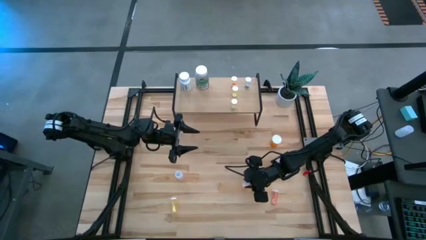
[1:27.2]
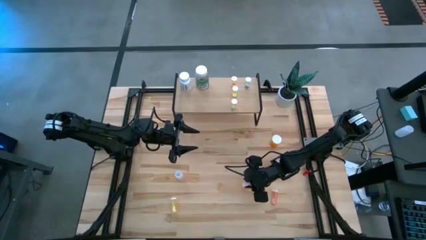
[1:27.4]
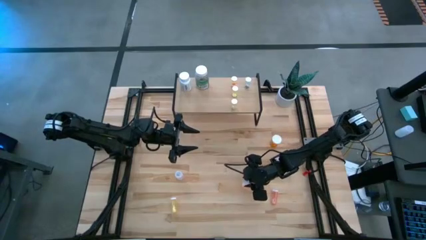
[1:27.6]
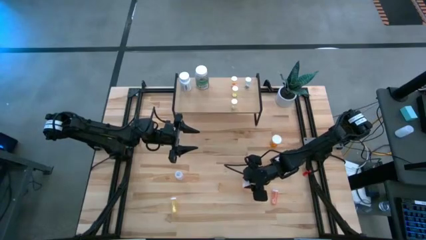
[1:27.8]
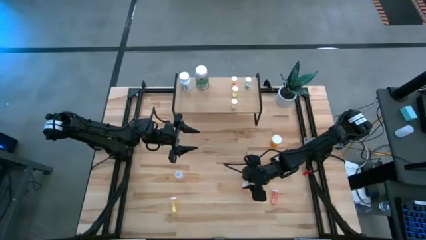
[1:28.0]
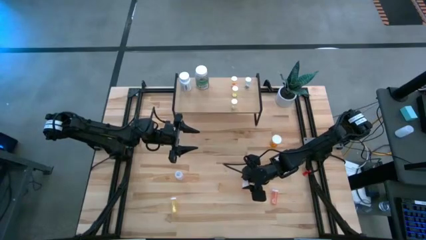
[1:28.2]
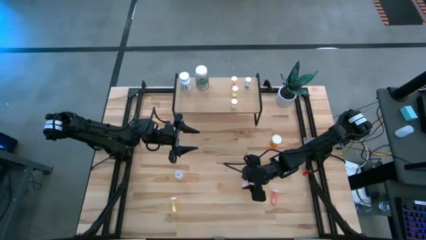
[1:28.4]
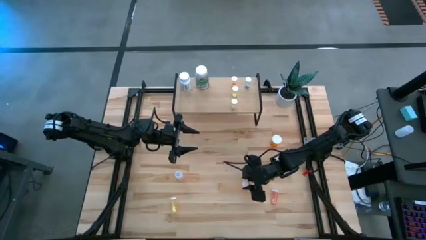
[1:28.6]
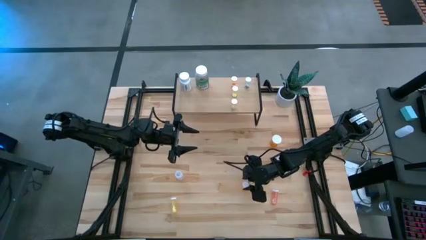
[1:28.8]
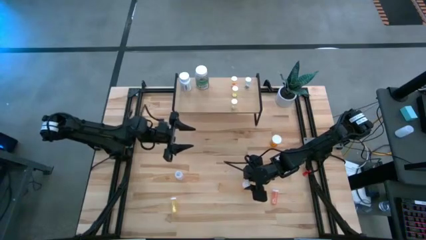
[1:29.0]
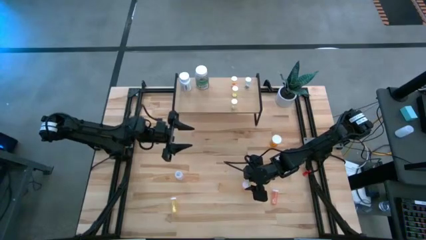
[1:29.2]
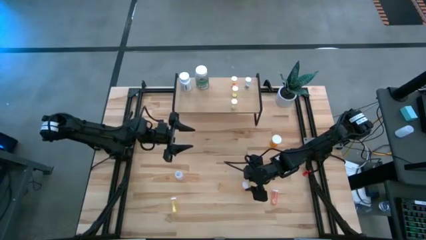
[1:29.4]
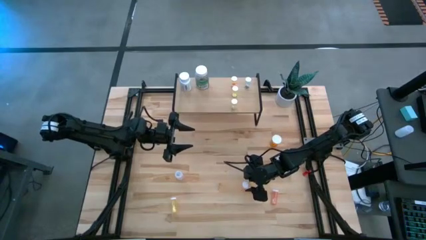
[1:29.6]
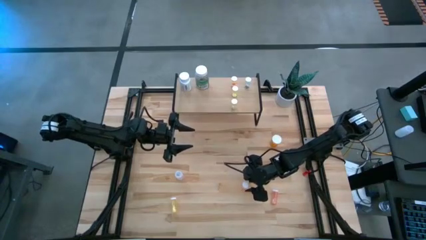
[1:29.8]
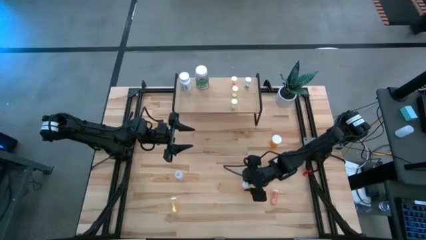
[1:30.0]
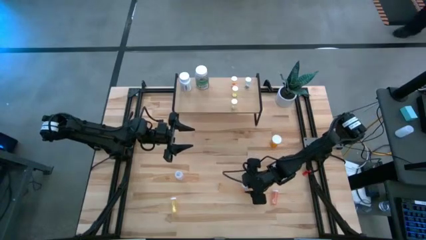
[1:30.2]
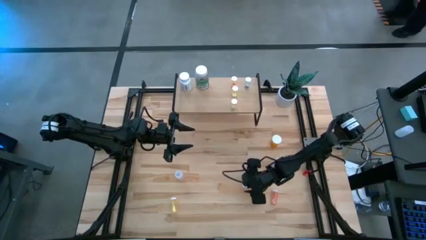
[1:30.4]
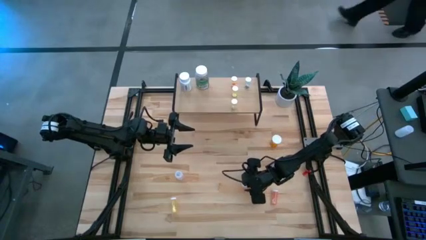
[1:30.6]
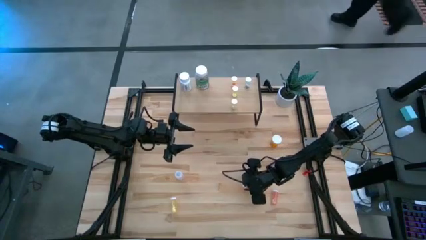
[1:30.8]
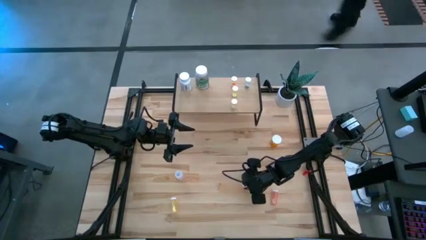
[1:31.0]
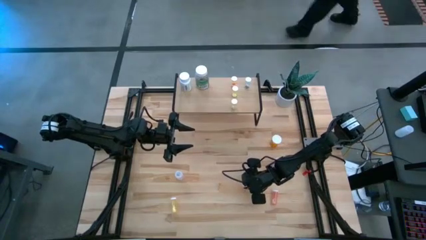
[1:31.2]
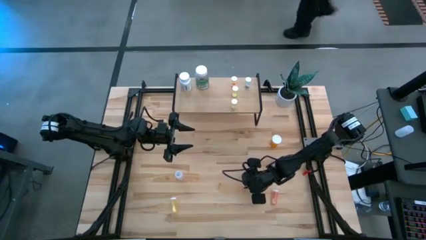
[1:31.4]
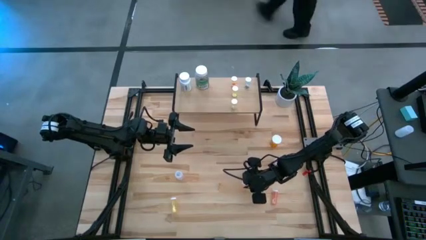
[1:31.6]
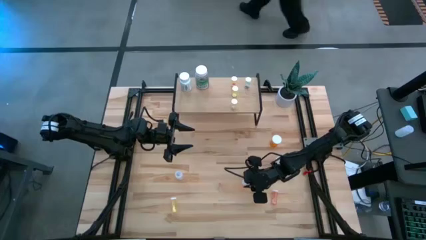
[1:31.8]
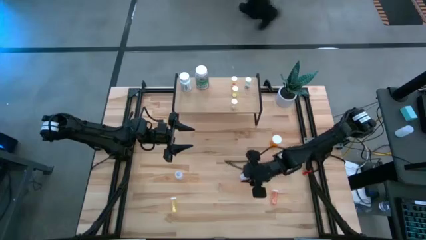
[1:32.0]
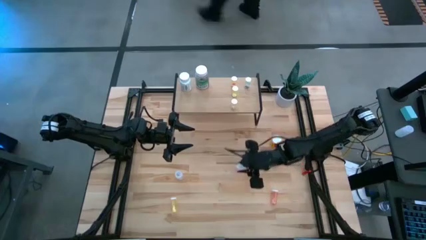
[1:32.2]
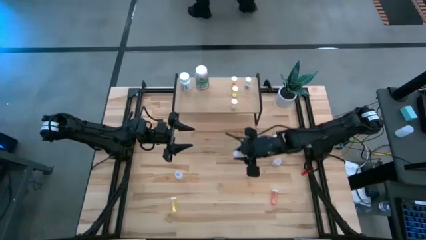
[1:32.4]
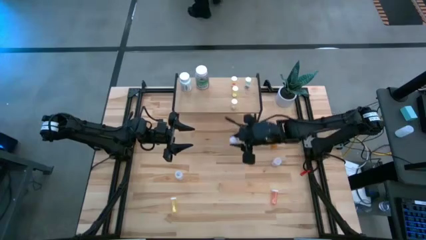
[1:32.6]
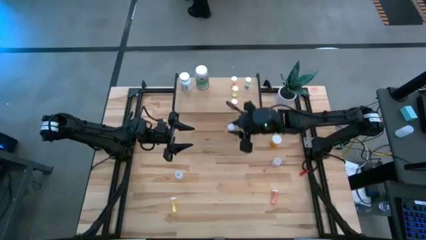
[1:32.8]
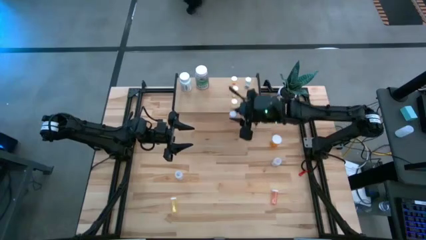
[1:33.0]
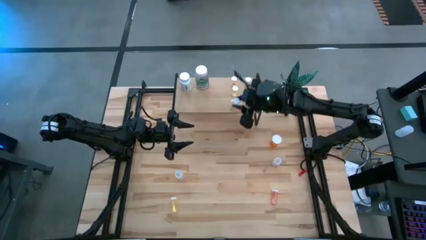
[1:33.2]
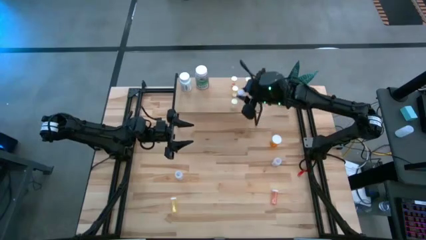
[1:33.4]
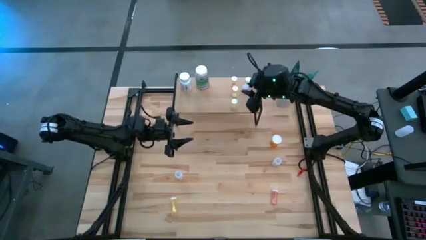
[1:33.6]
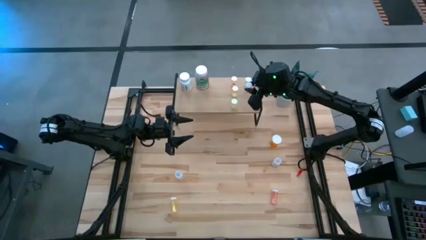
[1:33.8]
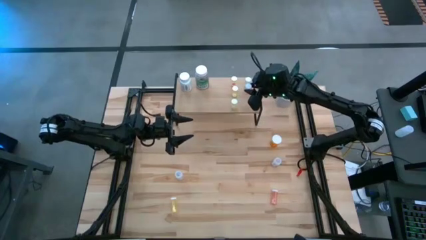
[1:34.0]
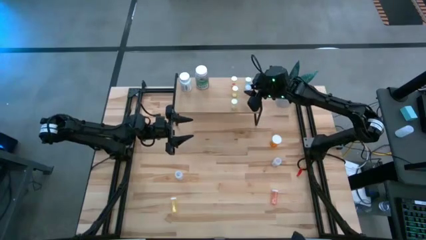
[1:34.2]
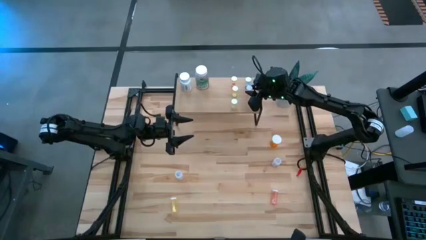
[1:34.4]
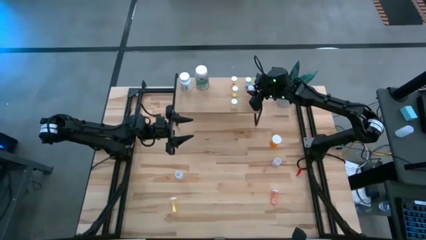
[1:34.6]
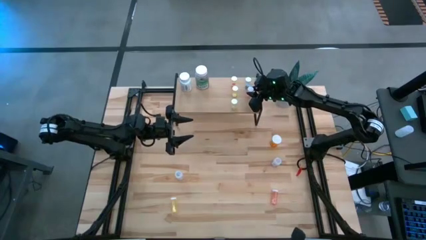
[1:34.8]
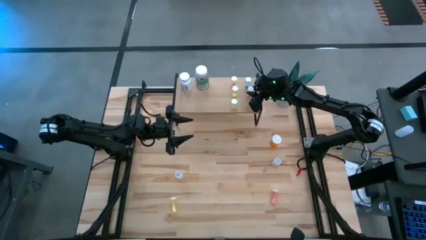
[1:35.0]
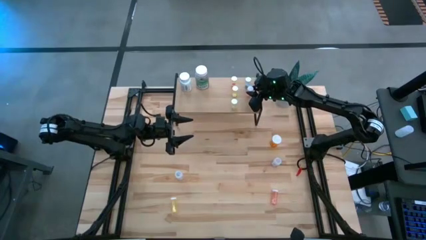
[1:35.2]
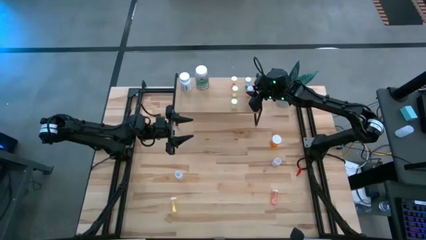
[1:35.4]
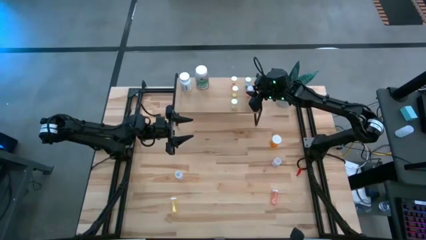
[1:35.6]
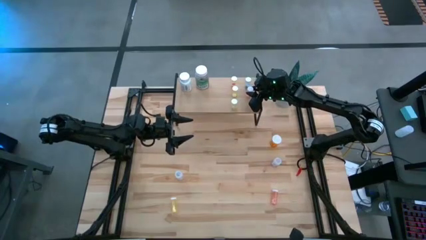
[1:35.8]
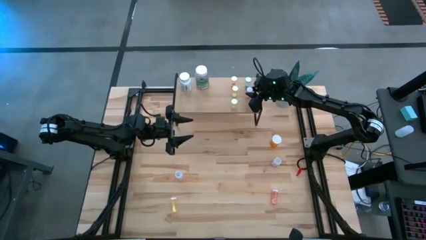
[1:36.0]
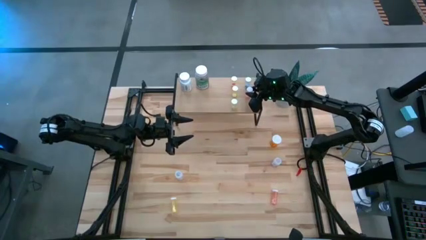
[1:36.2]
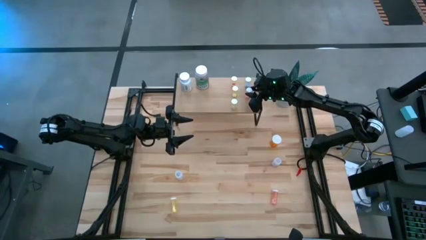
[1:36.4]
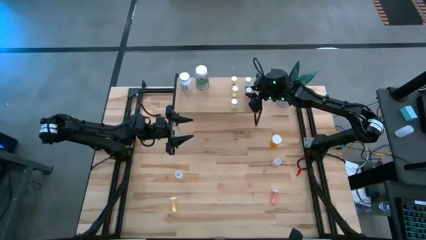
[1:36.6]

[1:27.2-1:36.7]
Task: Pick and place medicine bottles onto shelf by color
Put the right pink pill bottle on the shelf

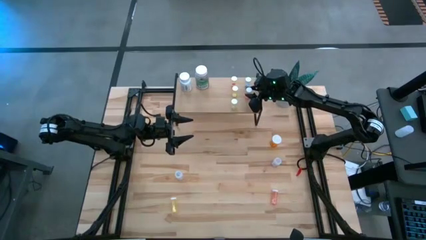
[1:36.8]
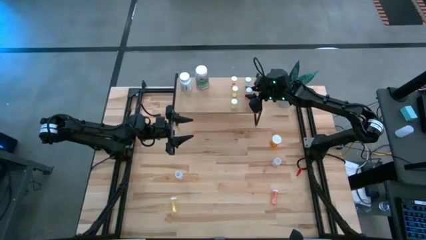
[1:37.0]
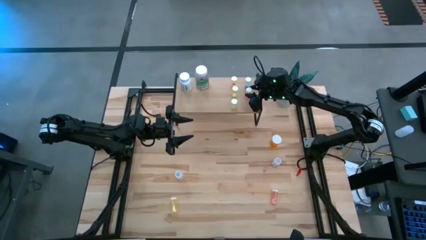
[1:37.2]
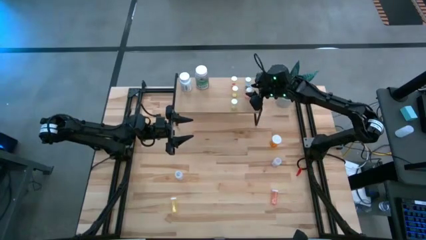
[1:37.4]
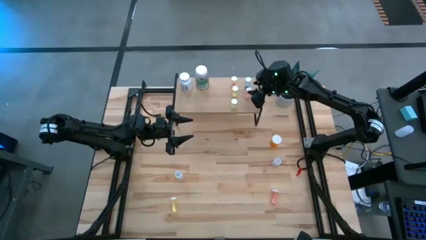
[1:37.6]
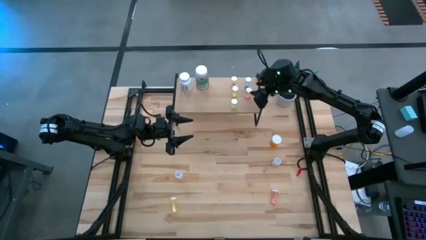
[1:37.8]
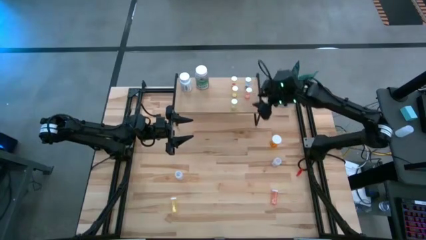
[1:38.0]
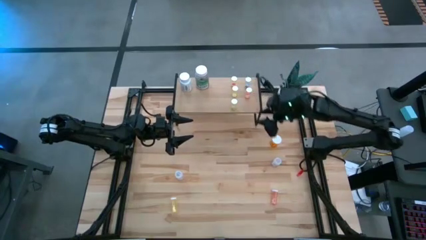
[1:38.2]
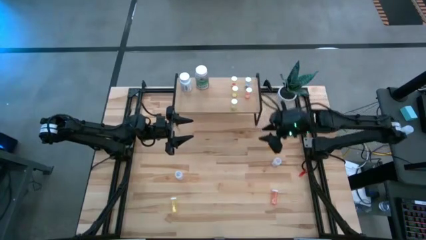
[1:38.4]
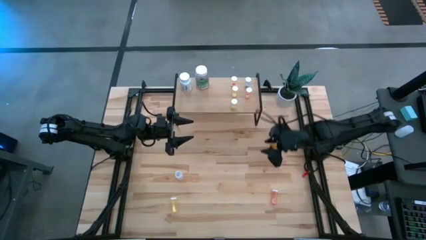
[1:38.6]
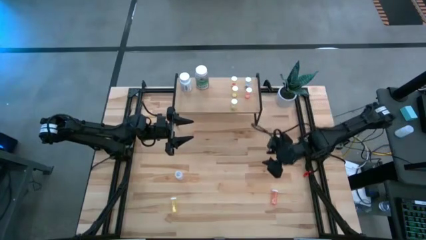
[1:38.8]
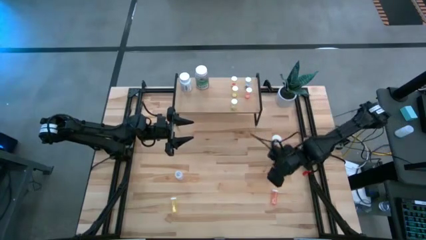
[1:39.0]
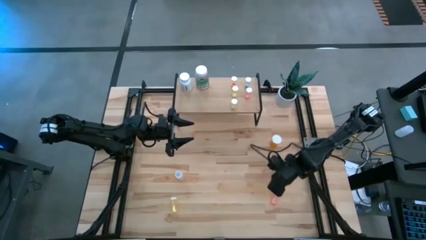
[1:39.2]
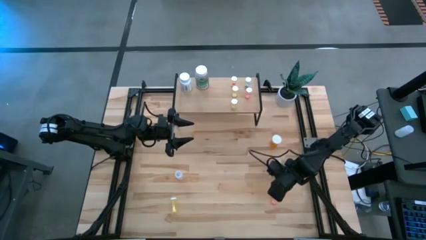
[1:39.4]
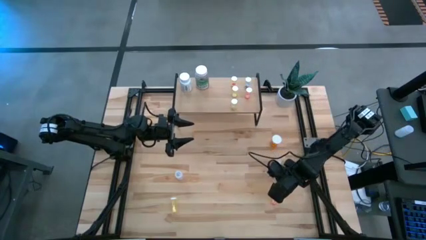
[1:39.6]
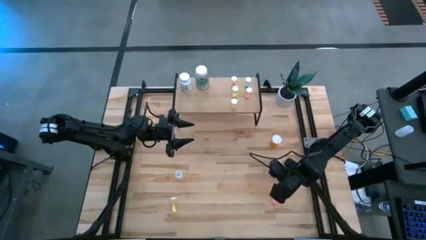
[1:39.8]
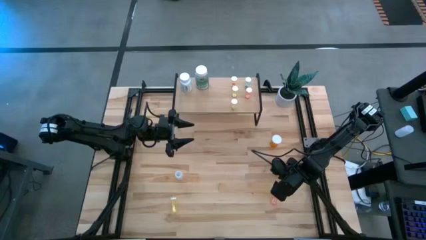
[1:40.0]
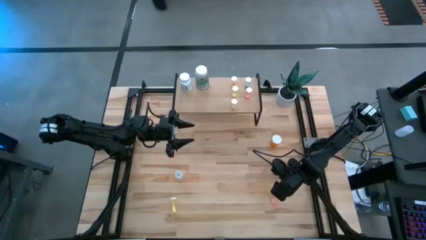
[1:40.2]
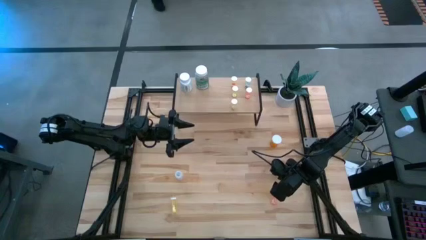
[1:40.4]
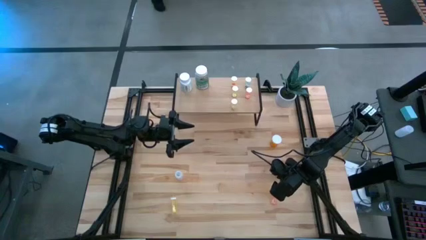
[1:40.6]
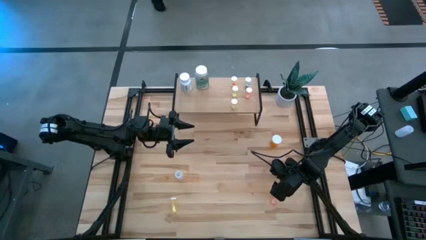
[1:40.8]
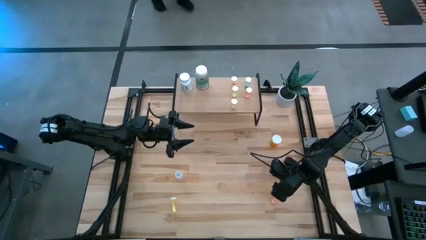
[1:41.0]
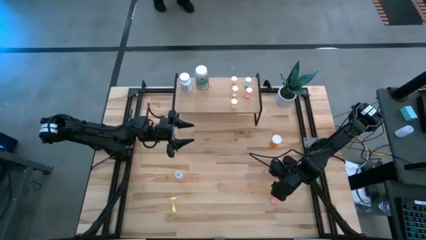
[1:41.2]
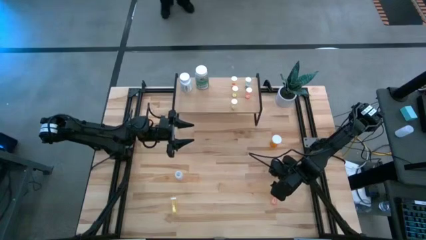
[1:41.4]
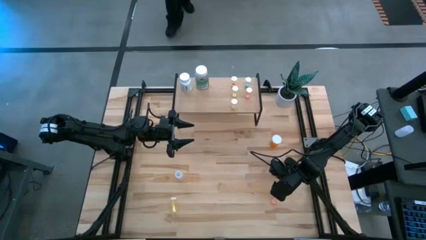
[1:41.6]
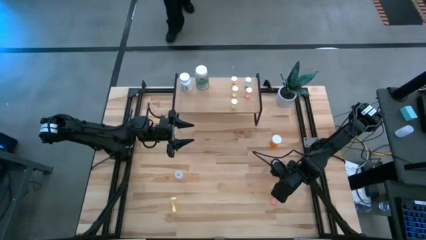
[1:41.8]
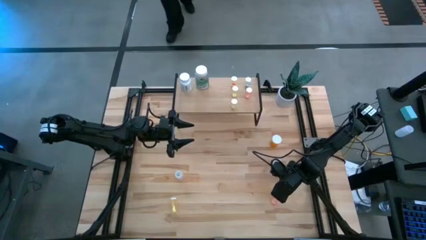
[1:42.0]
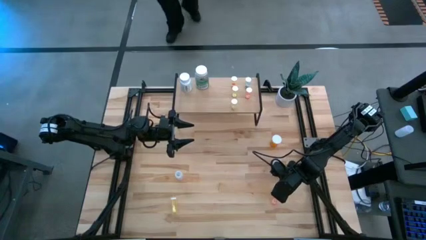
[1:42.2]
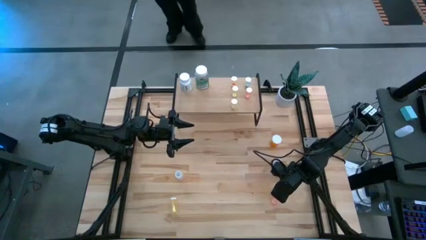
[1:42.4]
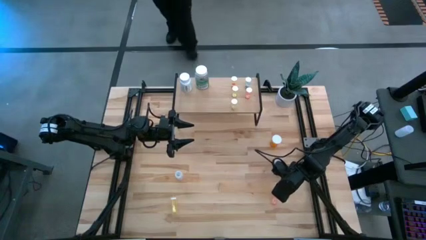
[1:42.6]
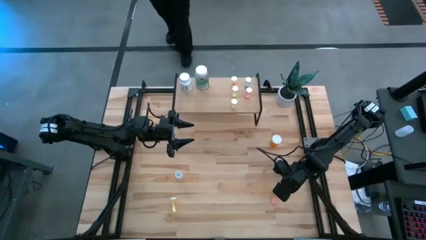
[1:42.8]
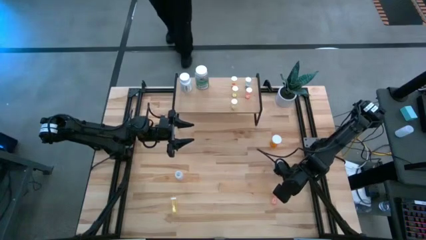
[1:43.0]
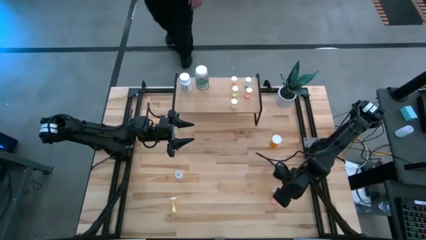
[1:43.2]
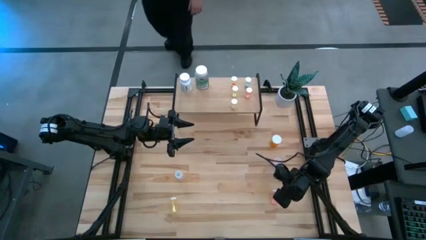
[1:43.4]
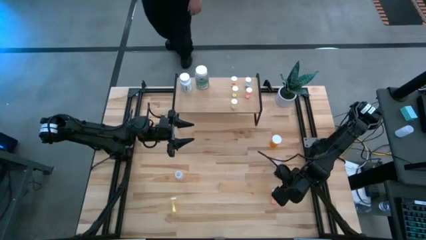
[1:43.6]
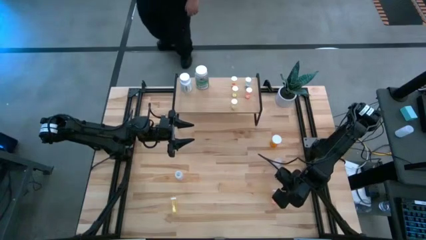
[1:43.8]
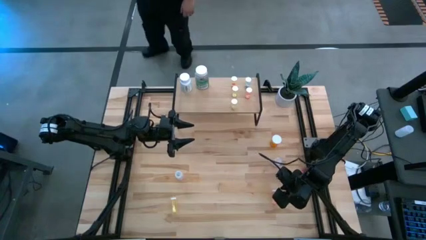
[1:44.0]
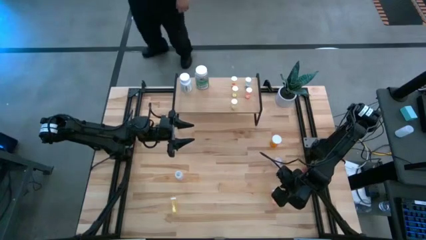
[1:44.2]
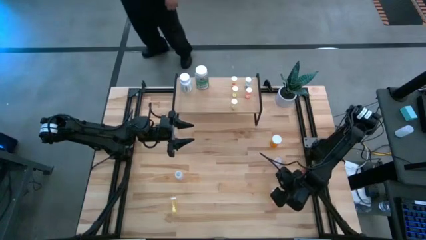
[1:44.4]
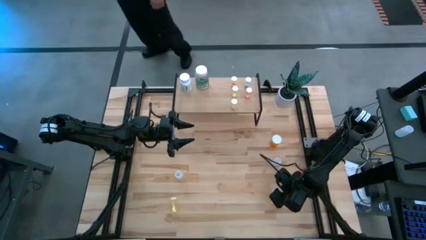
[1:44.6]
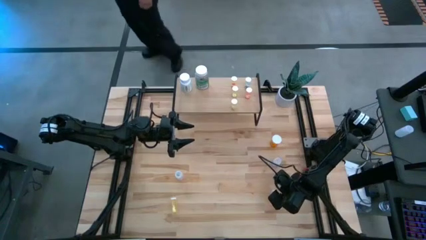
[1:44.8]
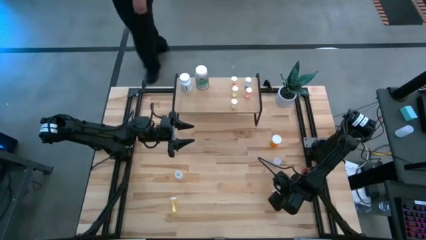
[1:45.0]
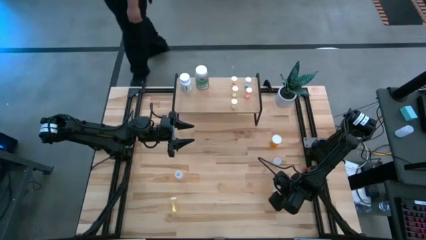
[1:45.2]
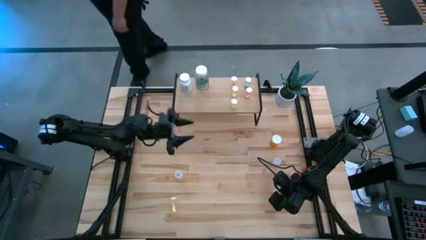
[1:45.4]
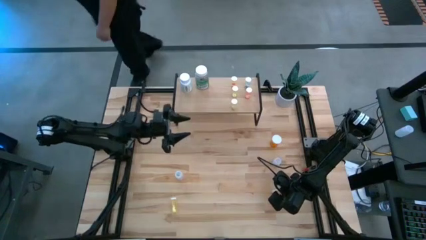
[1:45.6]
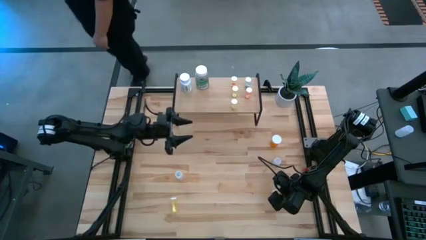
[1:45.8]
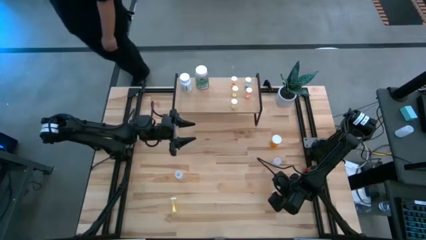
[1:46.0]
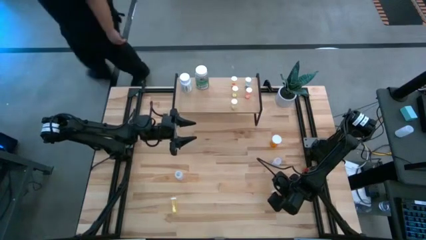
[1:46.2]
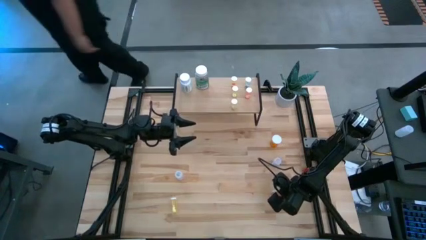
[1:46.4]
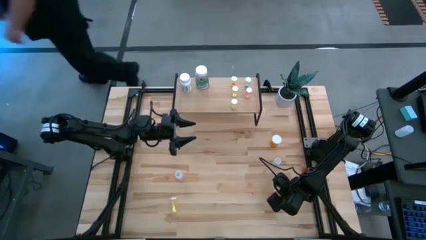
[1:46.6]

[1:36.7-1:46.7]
Put the pink pill bottle on the shelf
